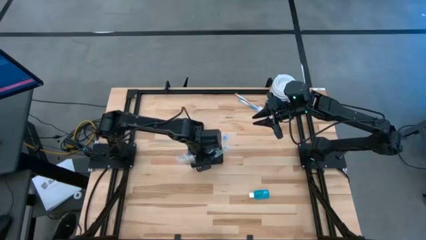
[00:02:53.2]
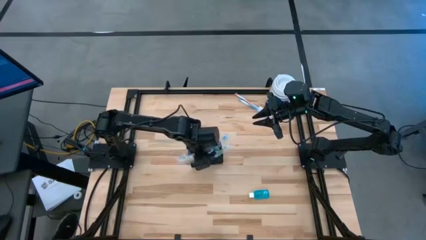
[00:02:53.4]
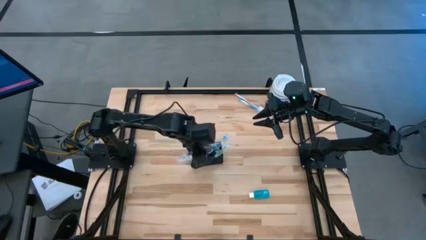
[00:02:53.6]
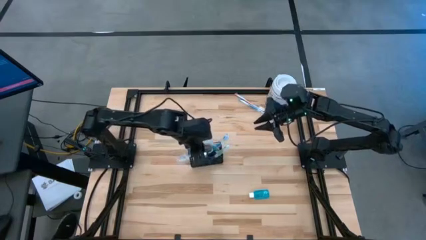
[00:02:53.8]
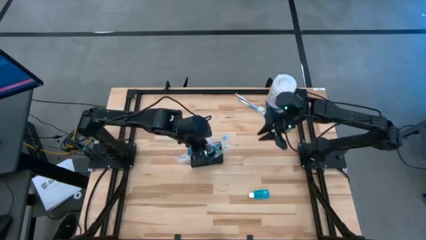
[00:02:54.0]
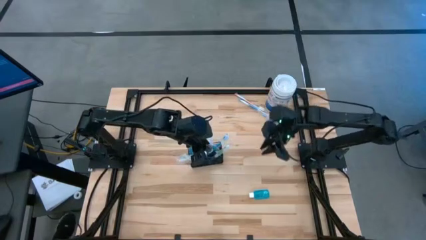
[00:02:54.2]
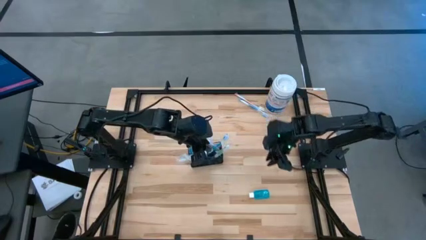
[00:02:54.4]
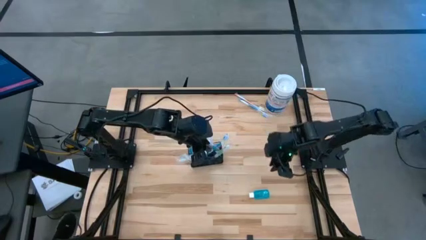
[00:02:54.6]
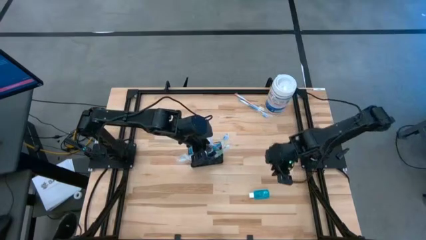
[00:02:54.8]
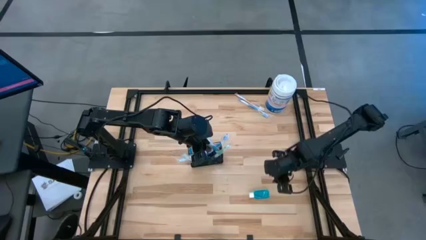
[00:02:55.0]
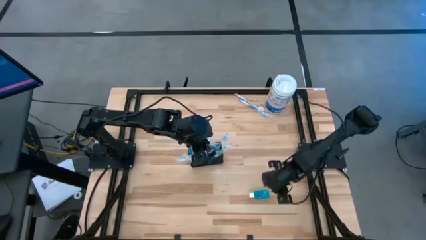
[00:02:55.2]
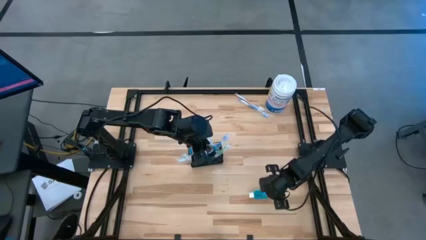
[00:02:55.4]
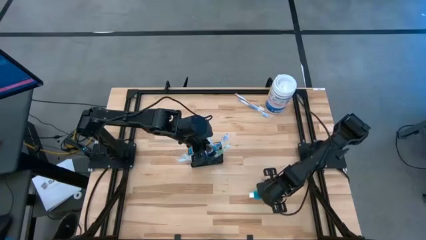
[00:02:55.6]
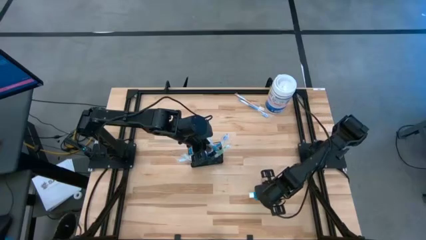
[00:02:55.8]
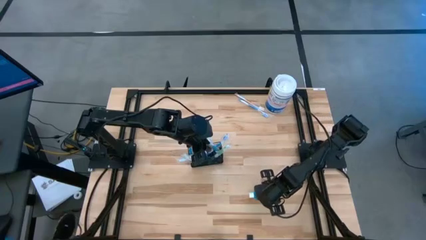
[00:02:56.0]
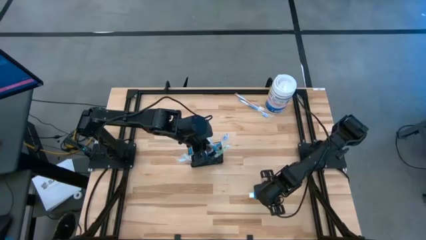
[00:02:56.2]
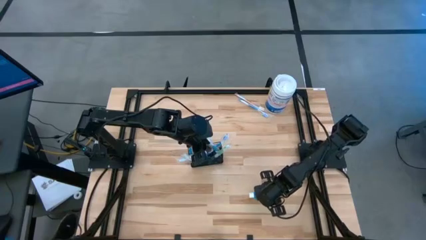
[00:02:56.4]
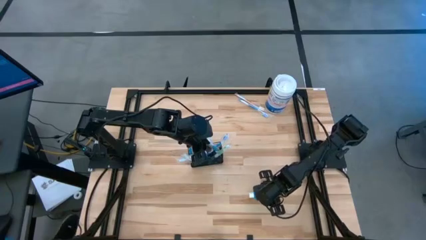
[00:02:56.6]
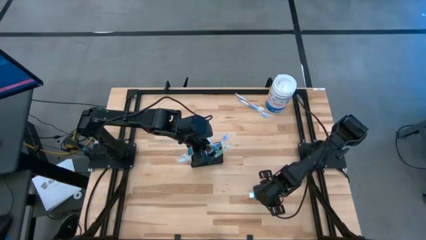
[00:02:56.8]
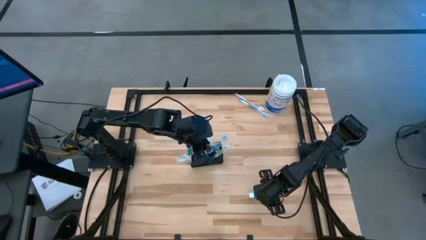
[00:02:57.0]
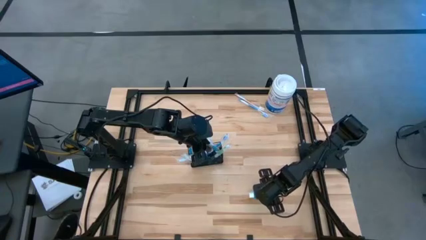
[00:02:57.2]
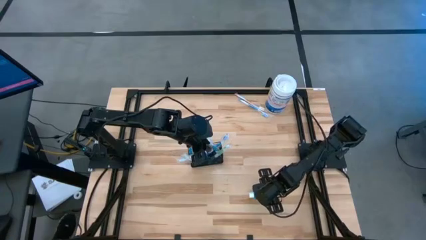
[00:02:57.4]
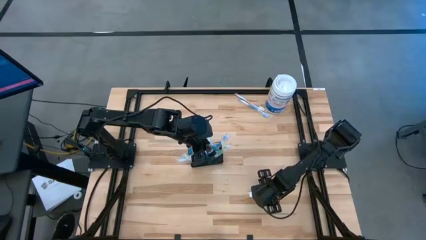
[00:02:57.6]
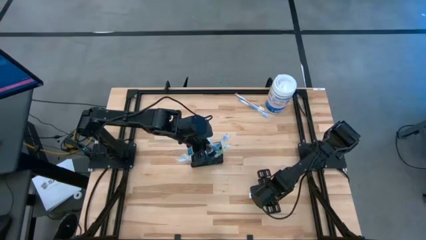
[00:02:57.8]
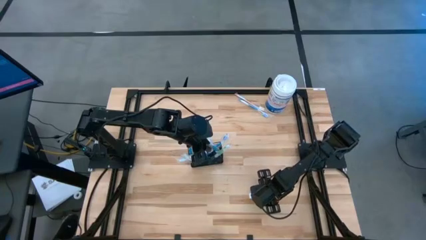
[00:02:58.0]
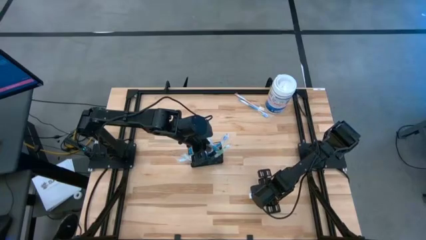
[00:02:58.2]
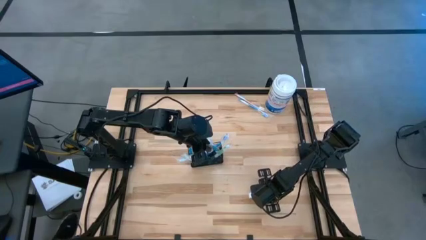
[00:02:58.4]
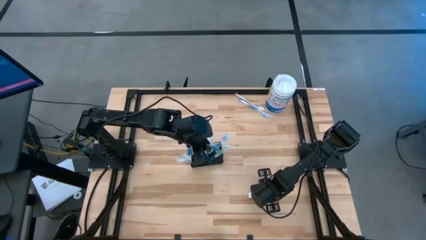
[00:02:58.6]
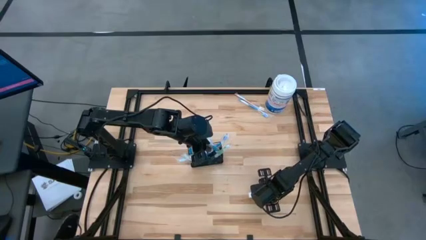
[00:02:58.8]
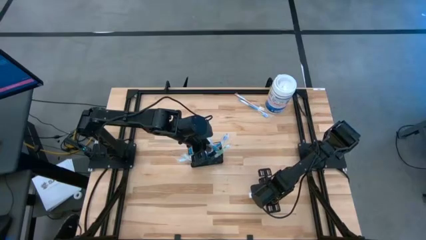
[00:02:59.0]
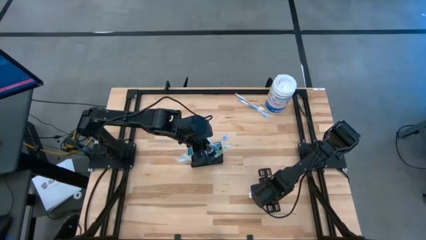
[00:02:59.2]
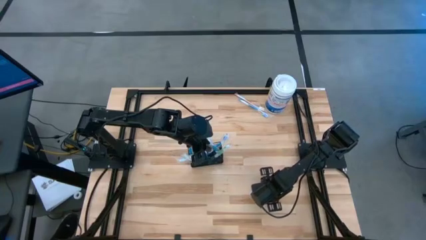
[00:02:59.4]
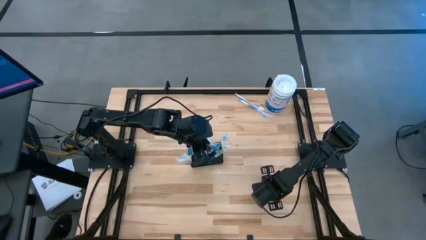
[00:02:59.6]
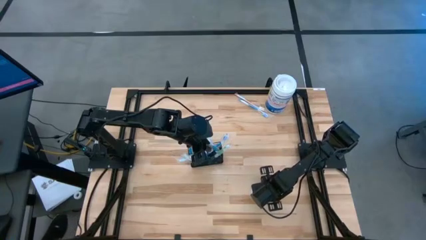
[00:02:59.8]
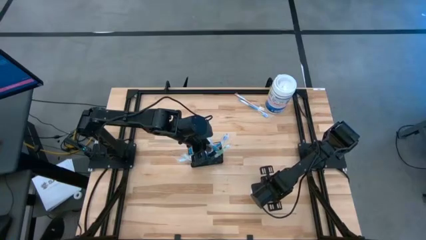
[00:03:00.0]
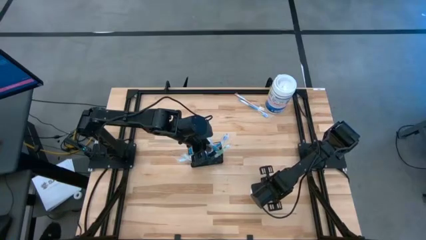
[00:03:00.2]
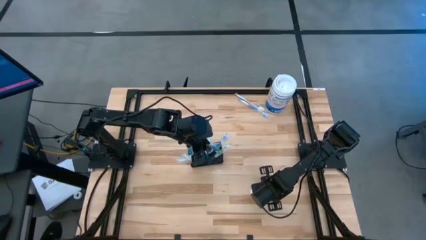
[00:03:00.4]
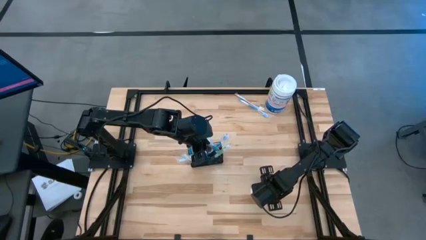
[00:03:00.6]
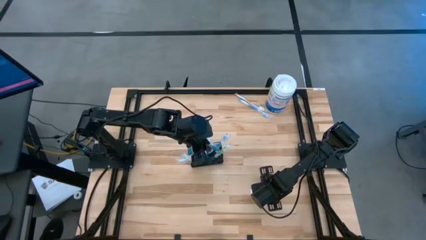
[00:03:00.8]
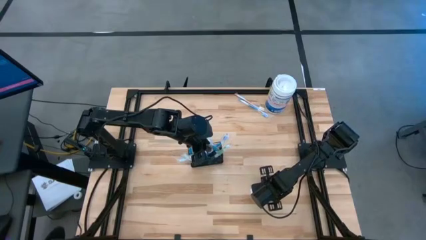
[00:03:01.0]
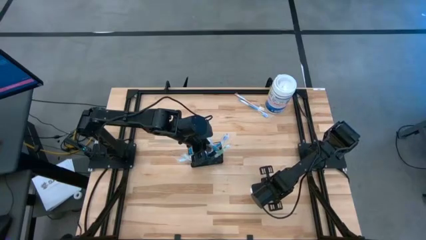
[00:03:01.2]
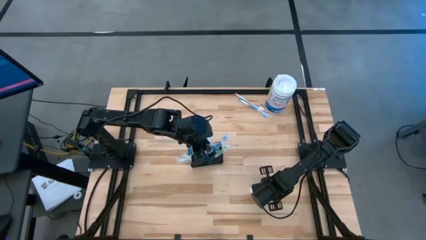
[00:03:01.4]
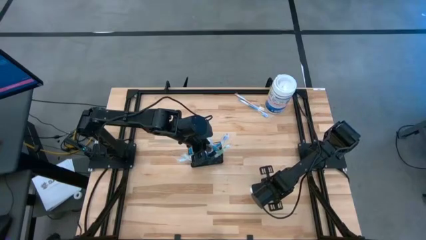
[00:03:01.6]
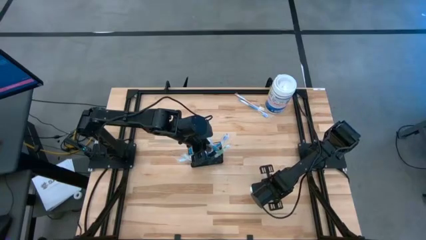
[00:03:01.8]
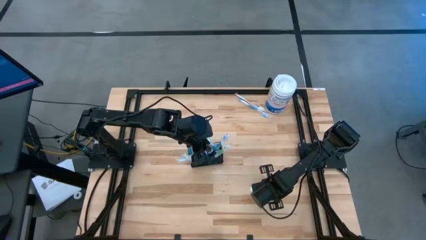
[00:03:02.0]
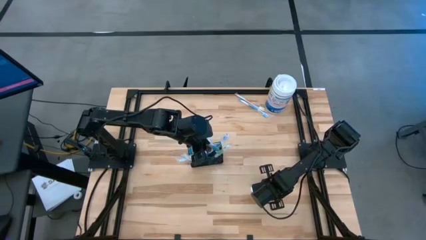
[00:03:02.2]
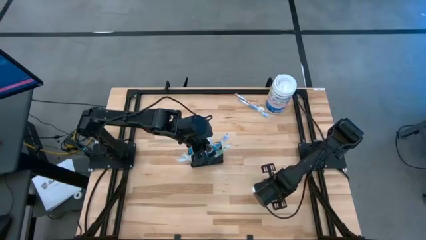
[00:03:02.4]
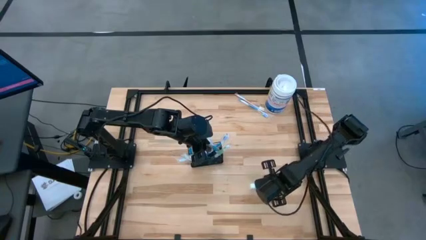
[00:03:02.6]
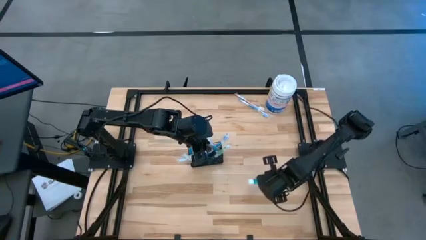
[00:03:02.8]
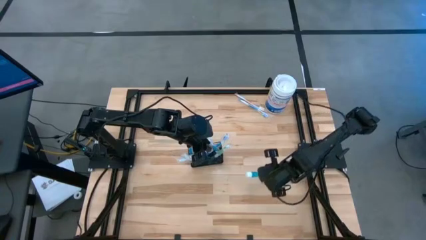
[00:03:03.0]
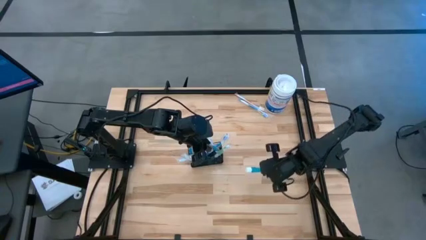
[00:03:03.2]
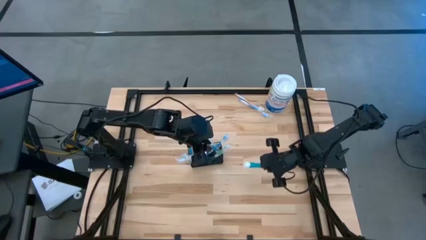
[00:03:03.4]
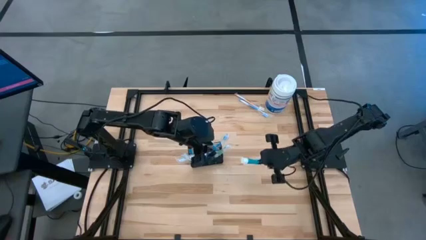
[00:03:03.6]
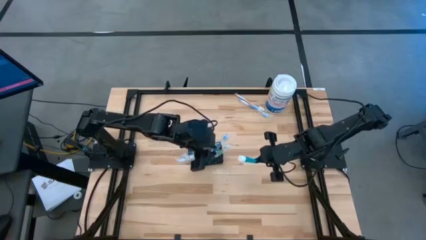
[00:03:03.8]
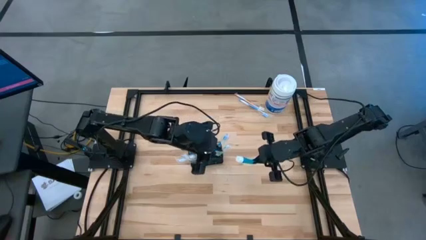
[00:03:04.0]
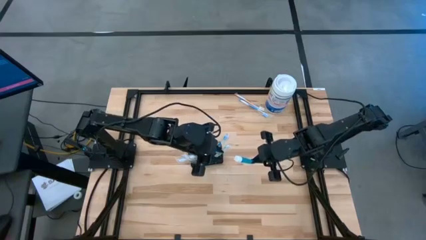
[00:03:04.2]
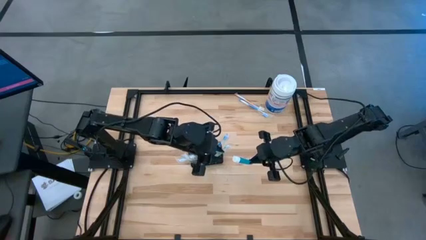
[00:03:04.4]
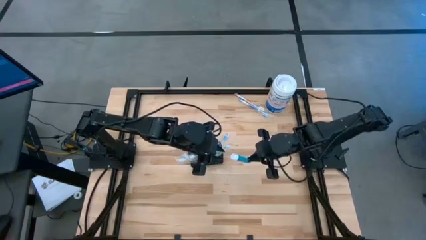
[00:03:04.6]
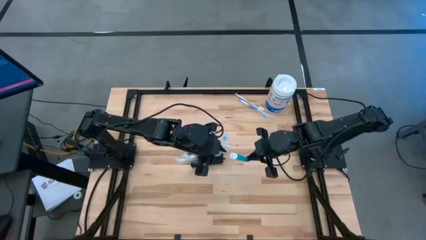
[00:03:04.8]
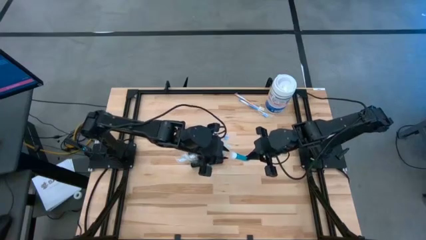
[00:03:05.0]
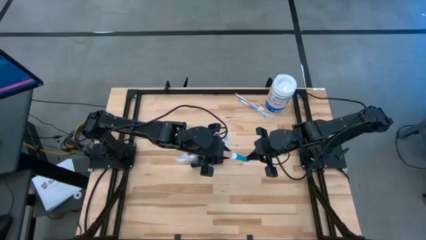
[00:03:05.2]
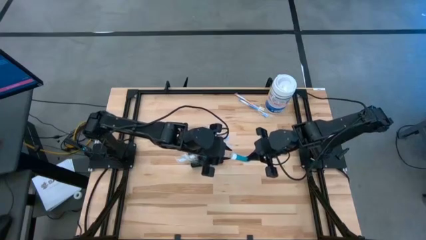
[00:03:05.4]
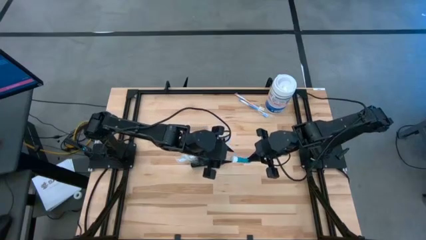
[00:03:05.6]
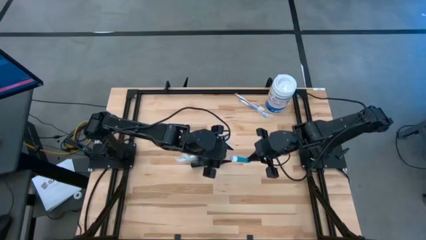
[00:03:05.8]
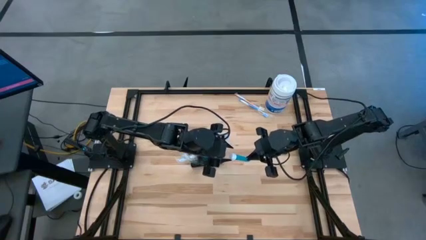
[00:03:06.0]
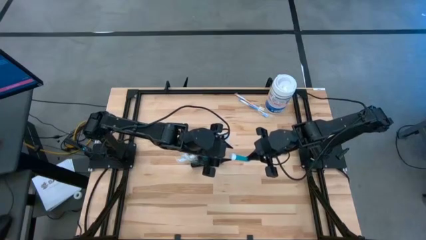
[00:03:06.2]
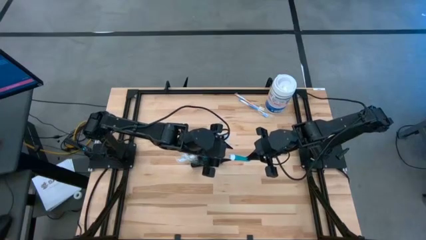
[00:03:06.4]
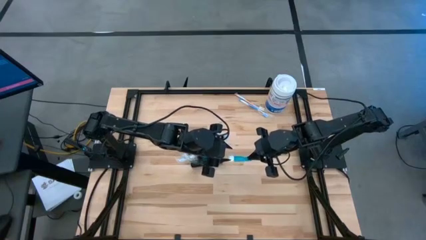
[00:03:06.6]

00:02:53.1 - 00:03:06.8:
Task: Pick & Place toothbrushing station
Put the blue mouthwash into the wire organizer

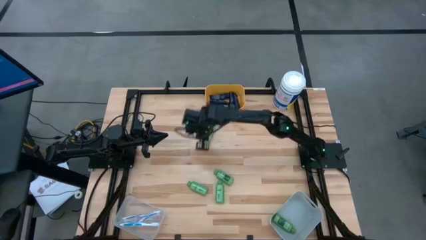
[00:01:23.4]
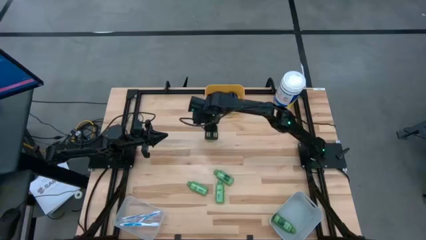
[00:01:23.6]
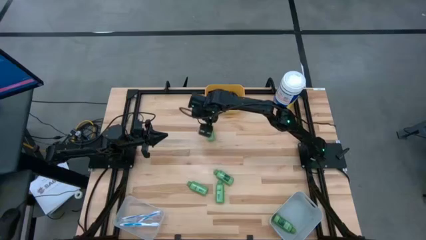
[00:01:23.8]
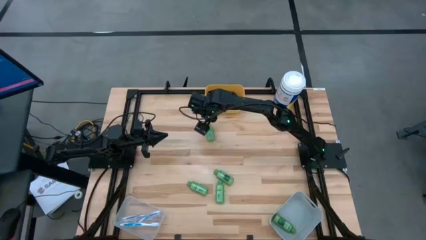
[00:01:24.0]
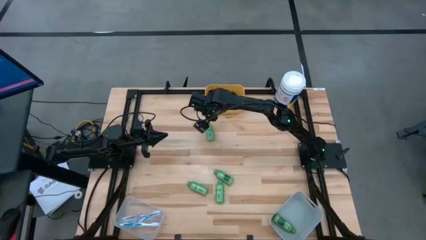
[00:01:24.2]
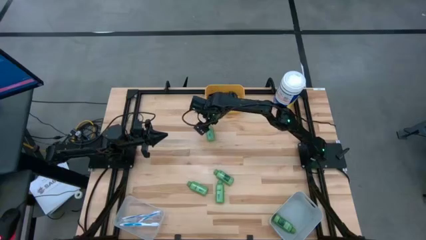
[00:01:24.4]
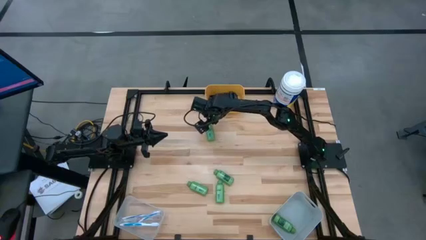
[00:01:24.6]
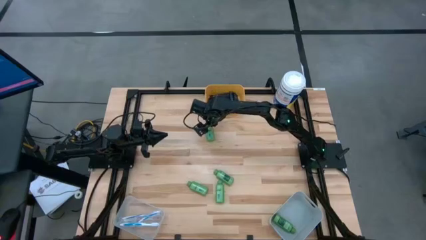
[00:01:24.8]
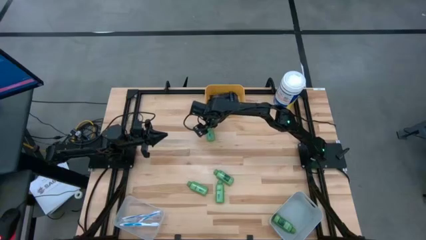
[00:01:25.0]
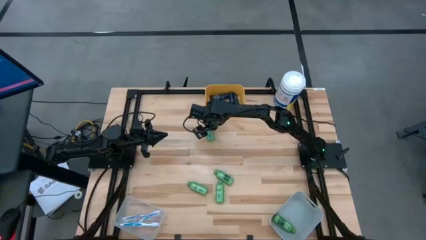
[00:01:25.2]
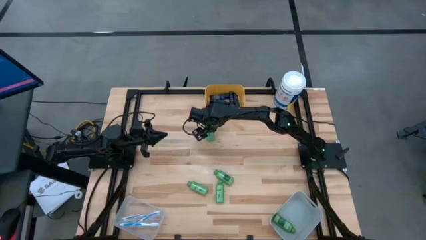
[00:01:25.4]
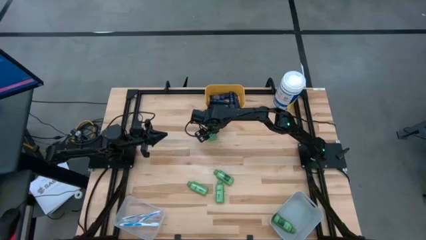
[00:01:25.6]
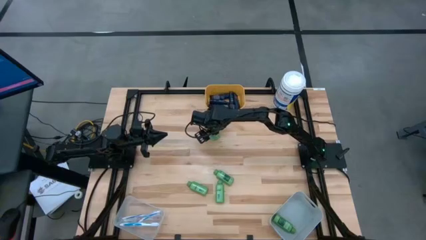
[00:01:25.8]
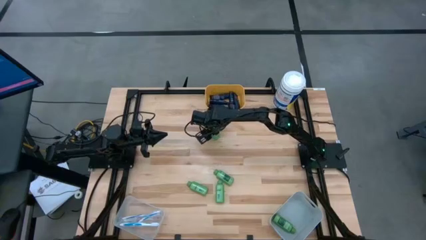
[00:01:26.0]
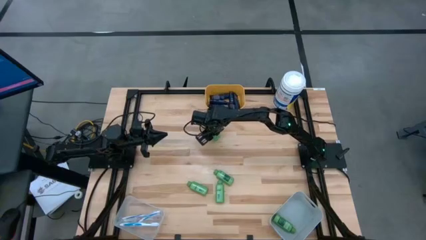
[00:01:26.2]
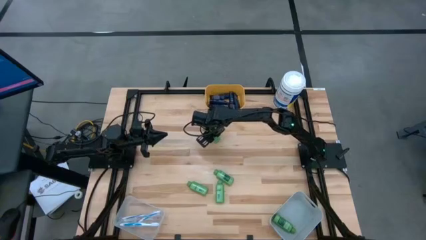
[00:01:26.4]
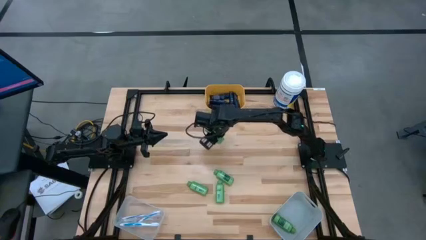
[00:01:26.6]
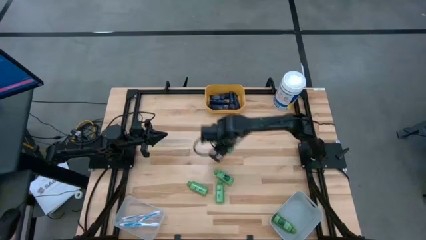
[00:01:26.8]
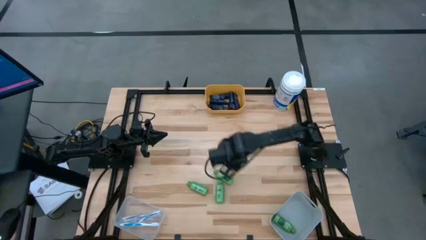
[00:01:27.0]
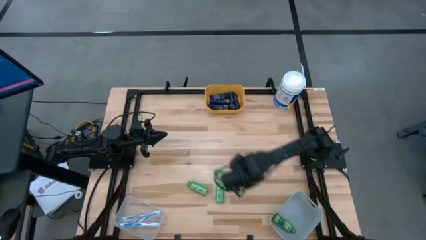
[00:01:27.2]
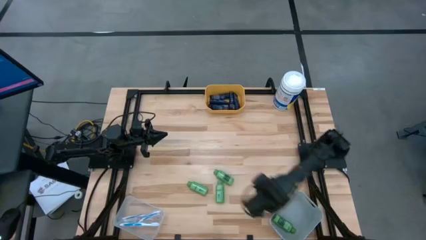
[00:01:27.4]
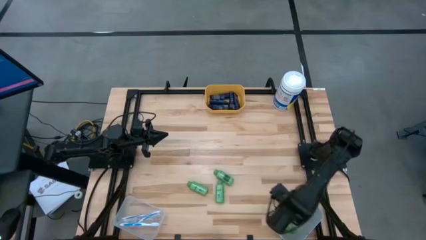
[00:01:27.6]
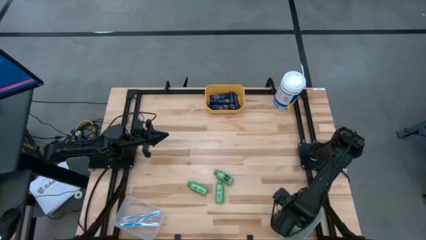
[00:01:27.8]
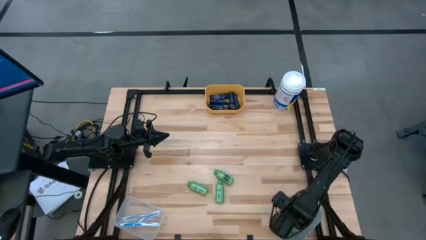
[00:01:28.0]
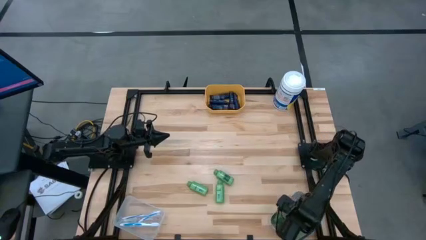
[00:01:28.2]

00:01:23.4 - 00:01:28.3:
Task: Pick & Place Travel size toiletries
Put the shampoo into the white bin
